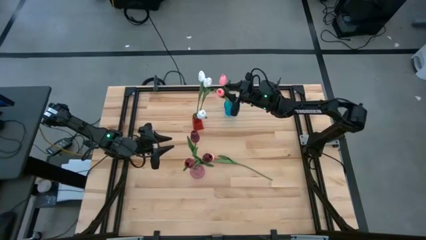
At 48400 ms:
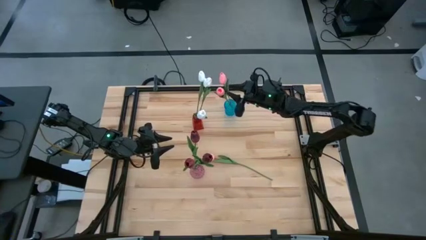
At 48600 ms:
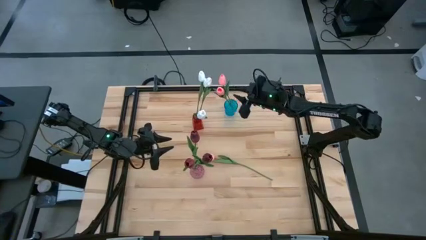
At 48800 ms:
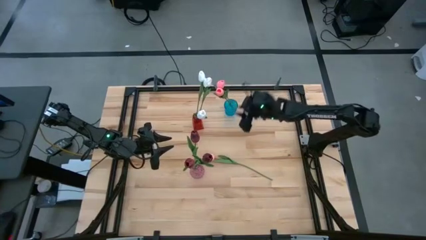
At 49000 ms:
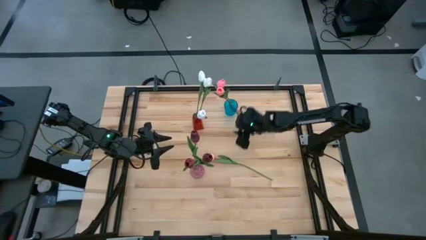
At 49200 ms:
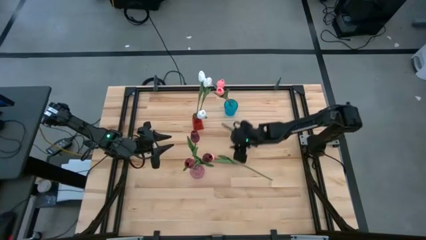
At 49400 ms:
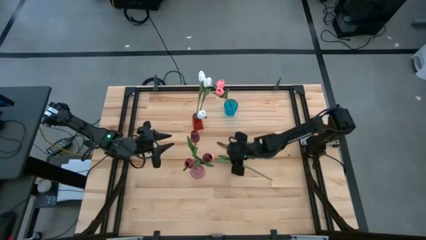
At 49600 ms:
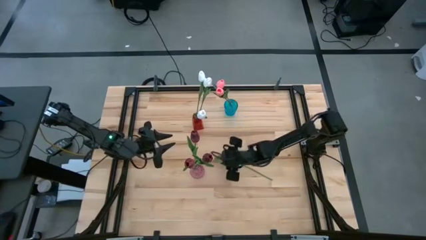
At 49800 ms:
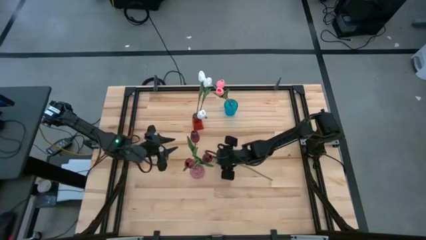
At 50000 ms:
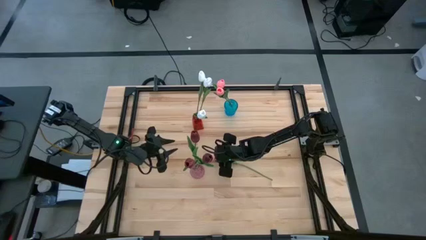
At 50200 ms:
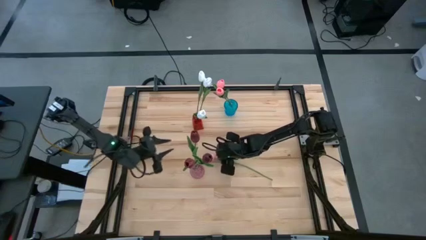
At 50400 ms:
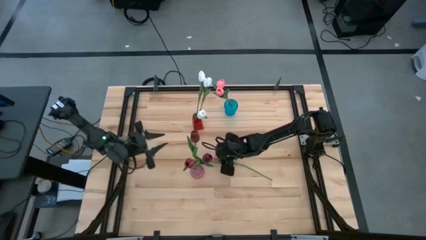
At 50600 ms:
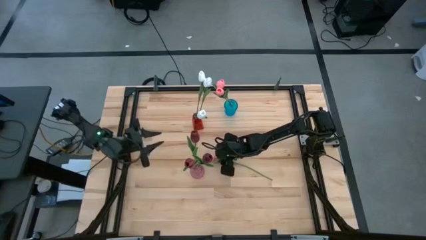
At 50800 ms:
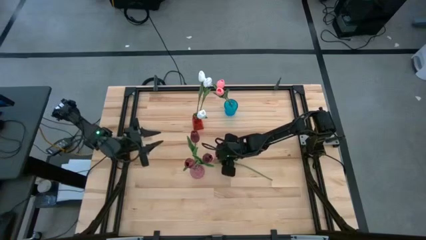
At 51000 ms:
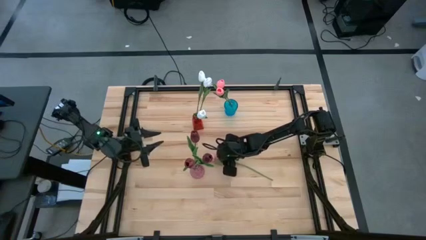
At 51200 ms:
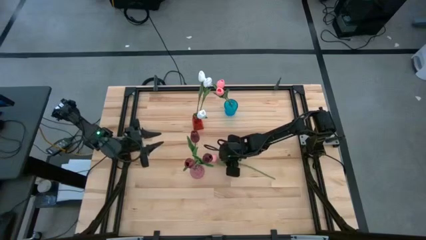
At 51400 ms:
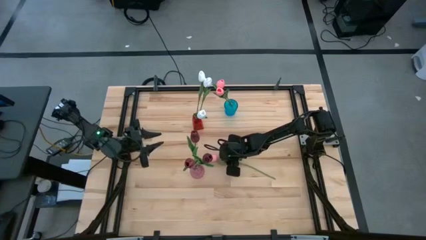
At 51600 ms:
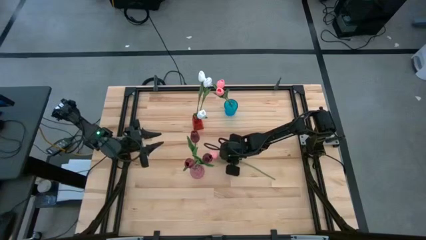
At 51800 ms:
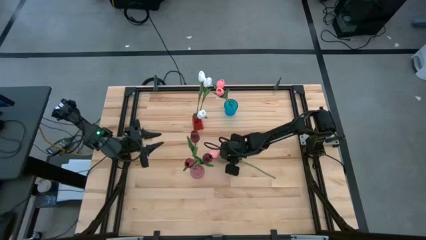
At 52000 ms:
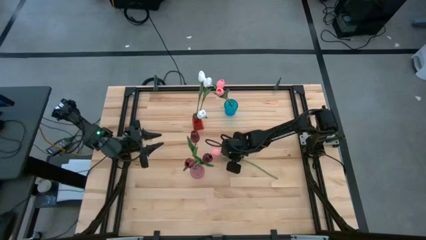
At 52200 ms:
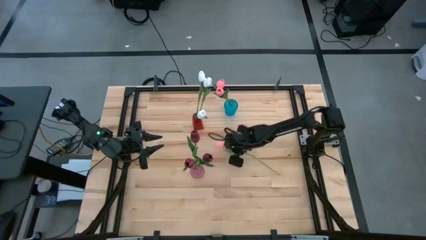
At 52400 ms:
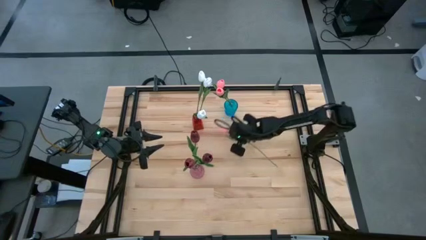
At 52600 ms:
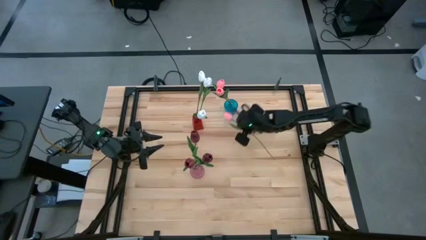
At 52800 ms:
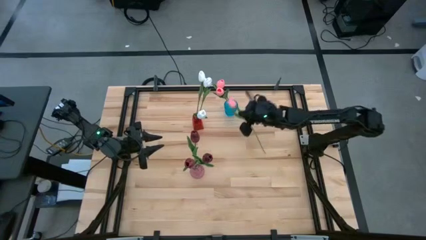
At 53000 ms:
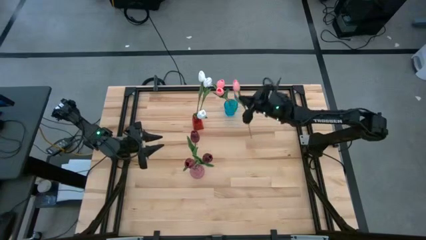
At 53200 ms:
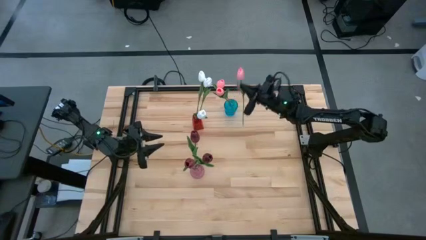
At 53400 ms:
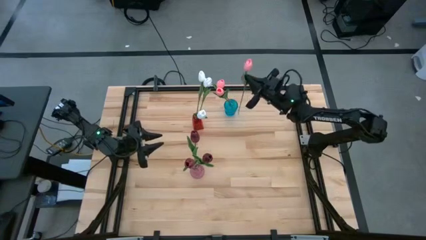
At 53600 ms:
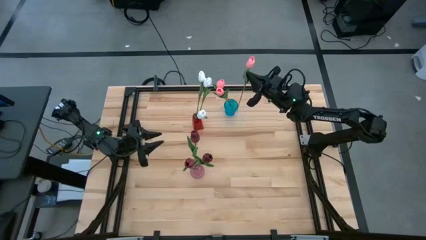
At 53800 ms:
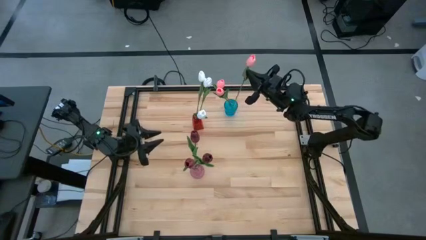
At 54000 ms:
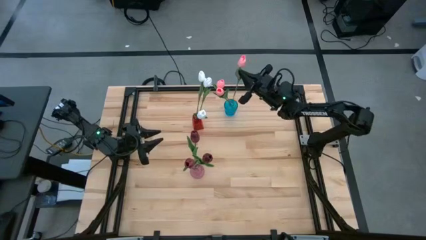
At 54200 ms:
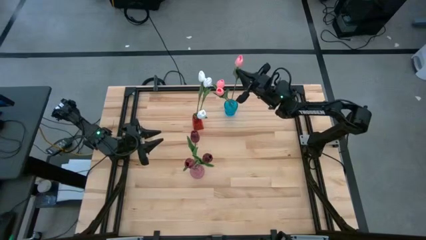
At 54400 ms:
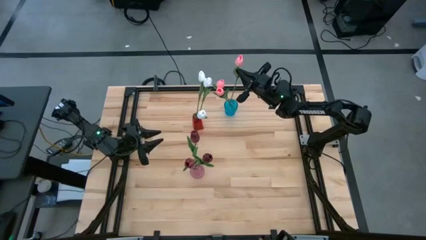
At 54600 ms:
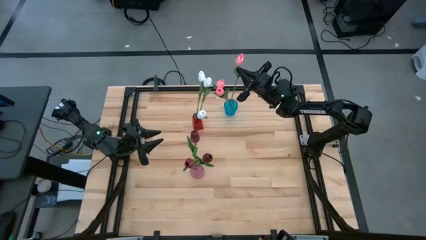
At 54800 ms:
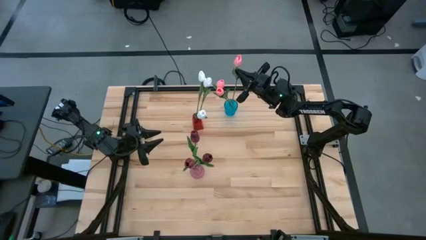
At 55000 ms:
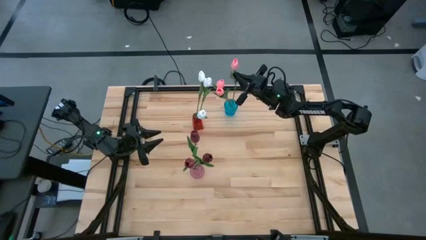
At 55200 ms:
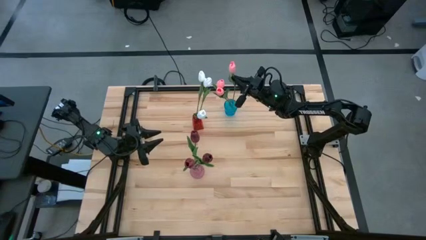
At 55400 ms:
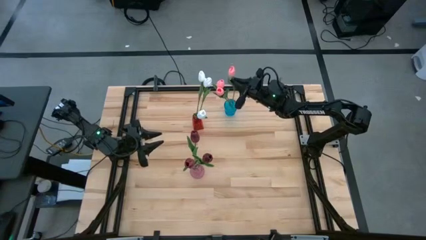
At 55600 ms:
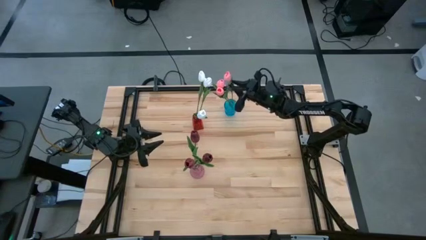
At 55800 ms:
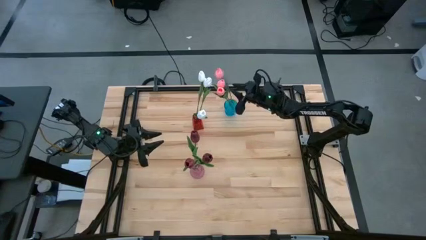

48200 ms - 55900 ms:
Task: Sort flowers into vase by color
Put the pink tulip into the blue flower vase

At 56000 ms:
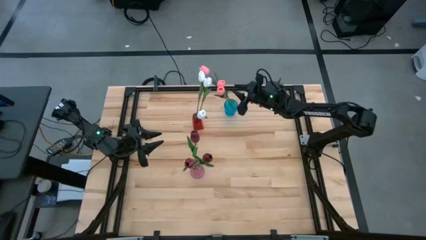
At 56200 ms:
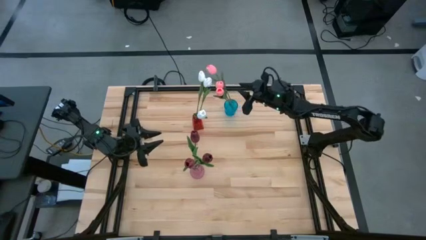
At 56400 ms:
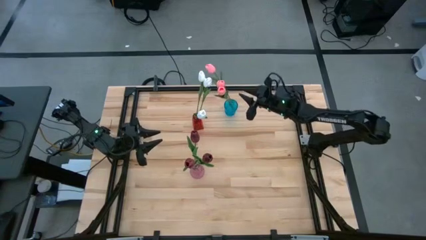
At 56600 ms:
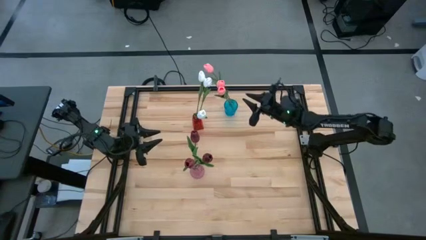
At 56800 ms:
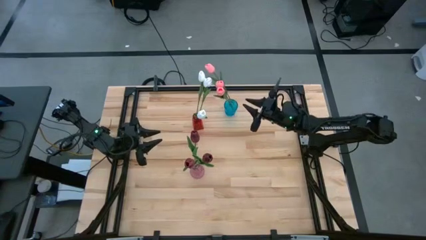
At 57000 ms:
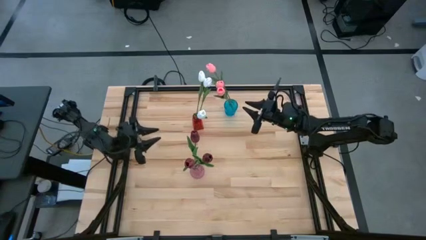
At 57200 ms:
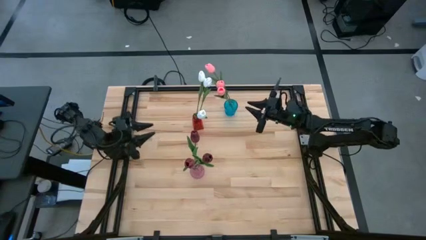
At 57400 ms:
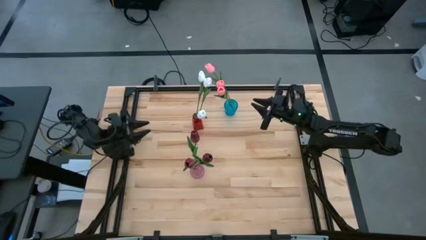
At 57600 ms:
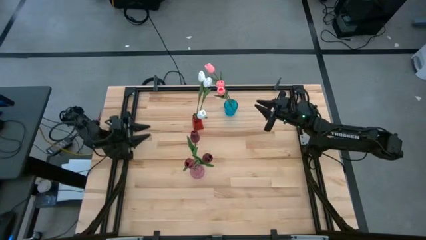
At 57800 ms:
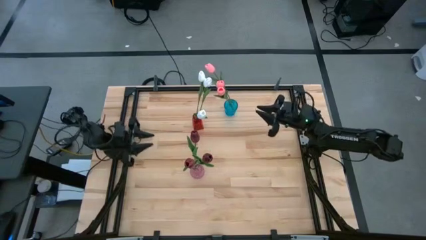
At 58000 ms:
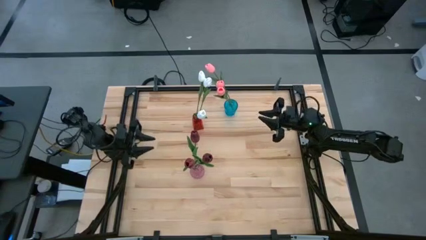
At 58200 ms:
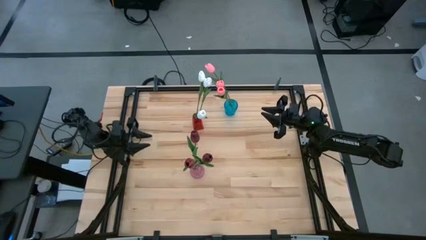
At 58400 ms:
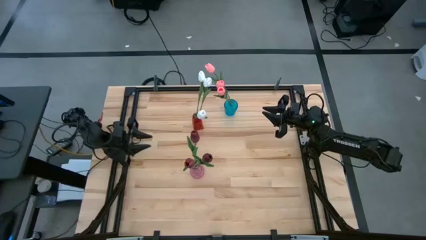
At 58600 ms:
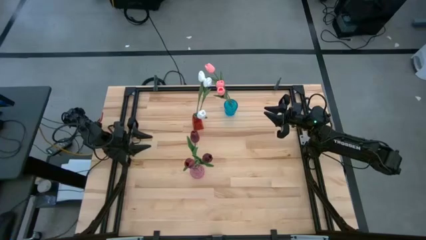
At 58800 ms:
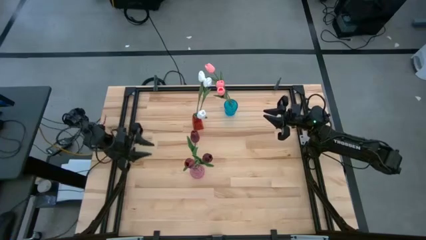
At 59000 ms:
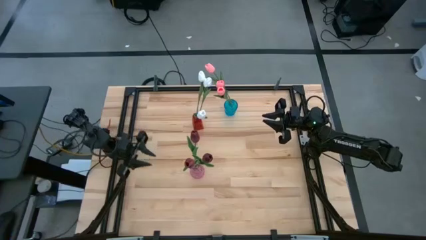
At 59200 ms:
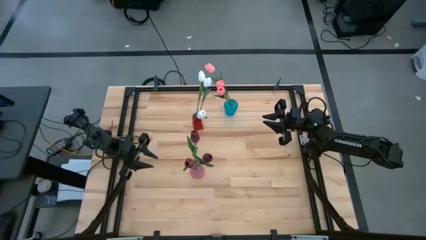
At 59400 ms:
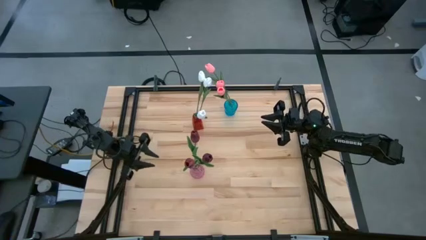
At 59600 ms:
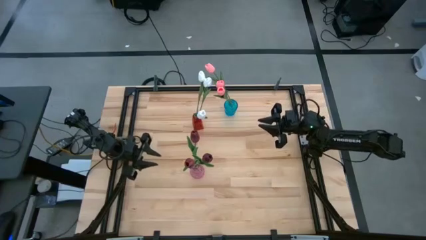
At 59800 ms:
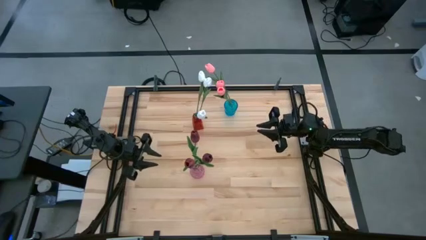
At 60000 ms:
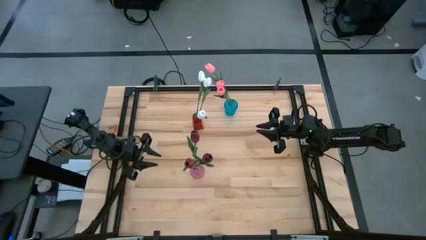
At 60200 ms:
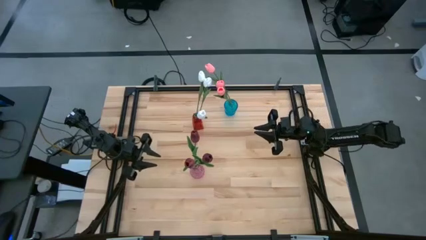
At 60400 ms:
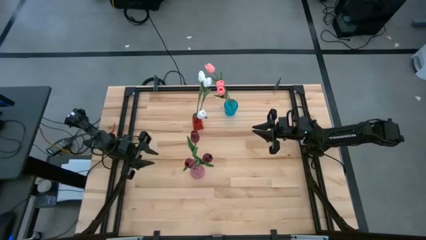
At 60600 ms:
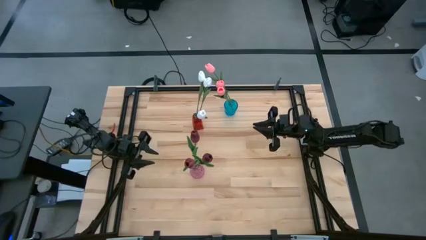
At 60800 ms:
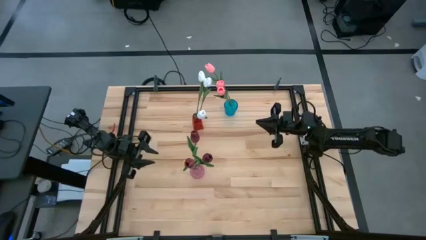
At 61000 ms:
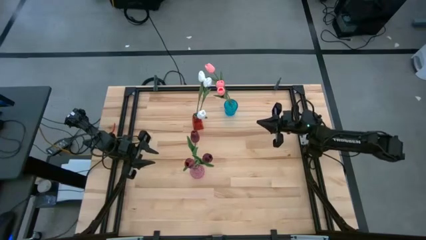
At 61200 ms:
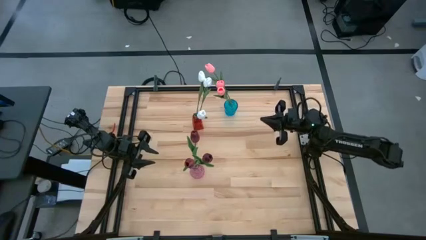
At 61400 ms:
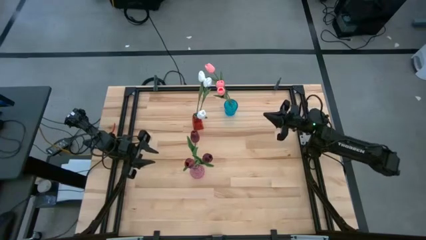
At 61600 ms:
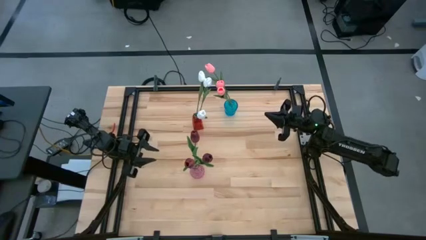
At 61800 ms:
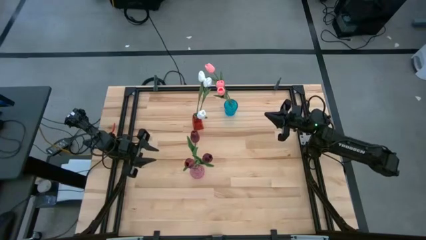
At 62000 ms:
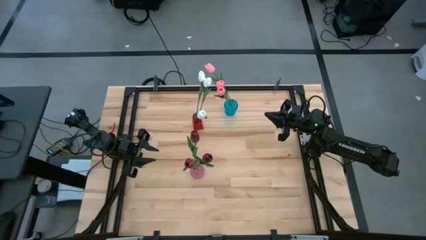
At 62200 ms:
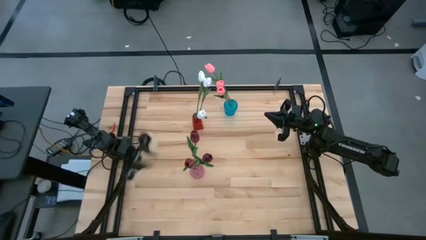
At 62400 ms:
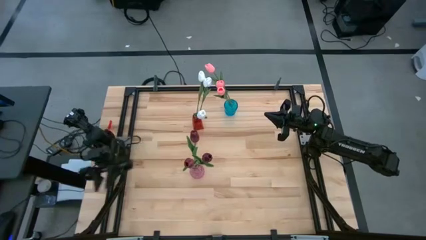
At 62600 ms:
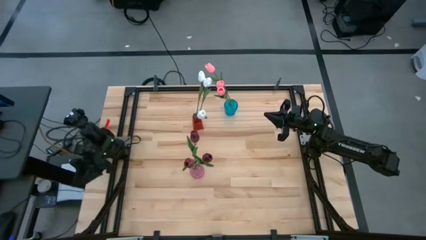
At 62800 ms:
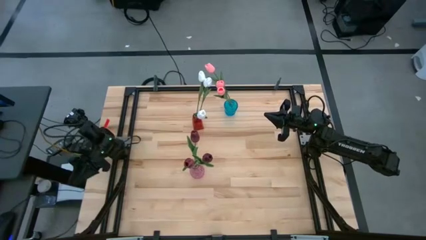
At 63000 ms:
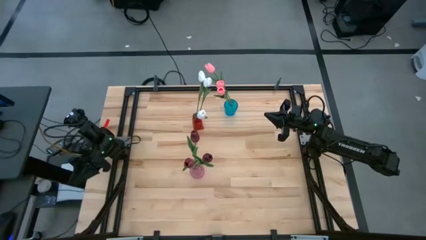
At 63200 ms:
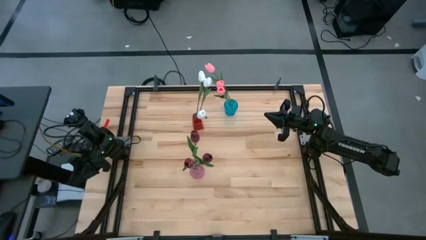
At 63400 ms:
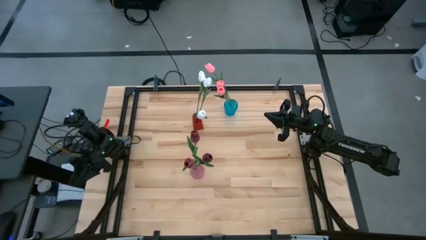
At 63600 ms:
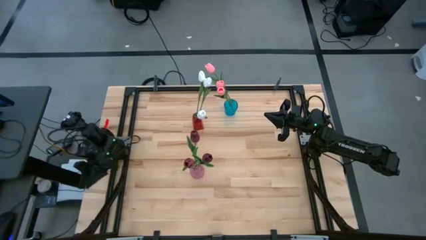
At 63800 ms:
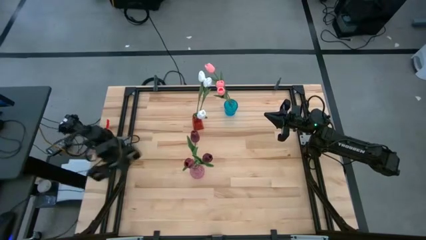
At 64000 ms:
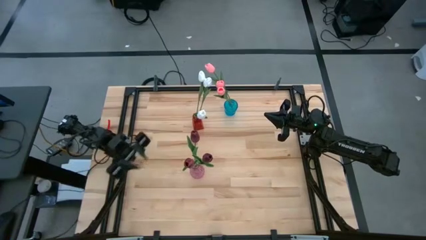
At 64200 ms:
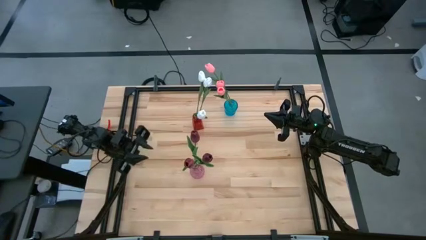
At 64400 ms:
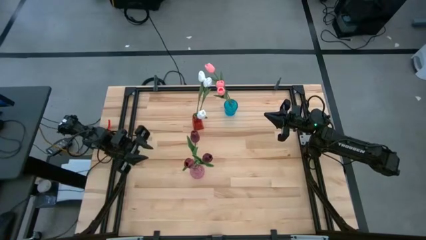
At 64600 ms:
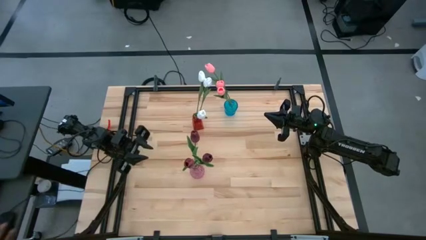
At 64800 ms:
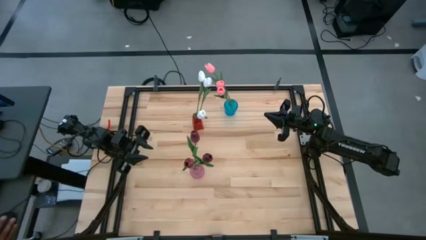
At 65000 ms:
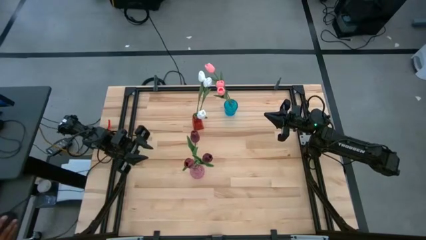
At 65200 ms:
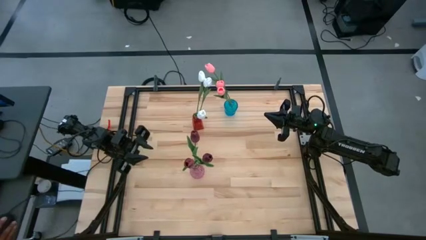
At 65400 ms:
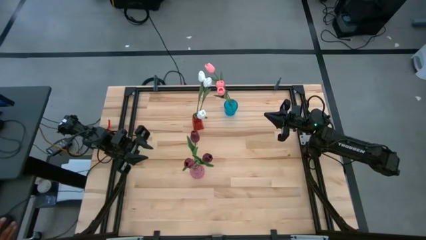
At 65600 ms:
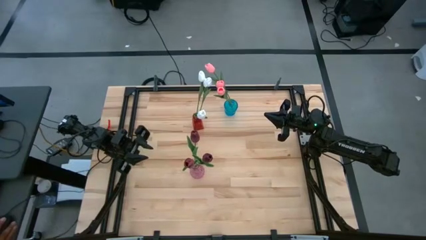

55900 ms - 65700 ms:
Return to Home Position
